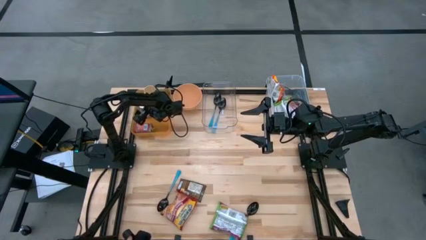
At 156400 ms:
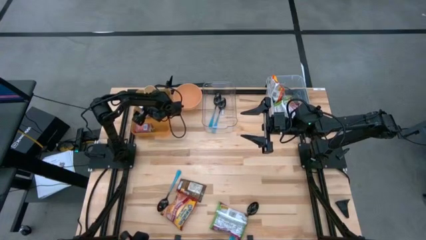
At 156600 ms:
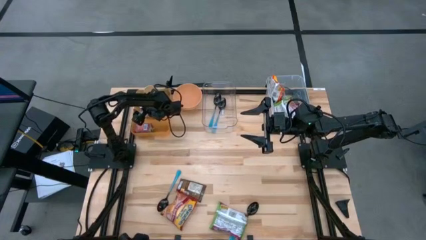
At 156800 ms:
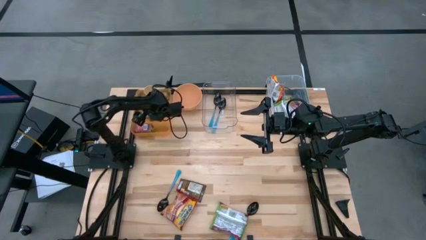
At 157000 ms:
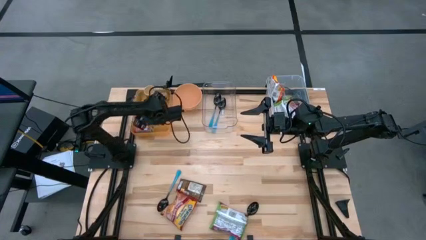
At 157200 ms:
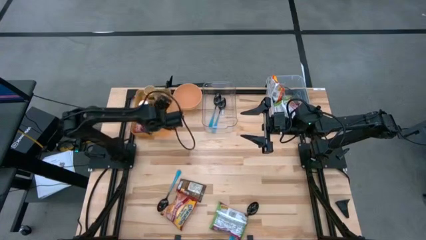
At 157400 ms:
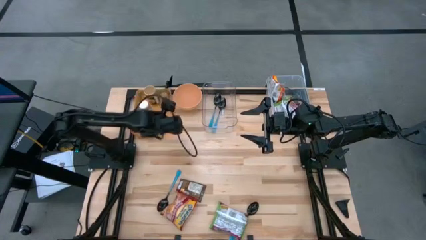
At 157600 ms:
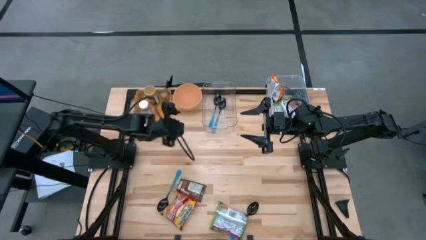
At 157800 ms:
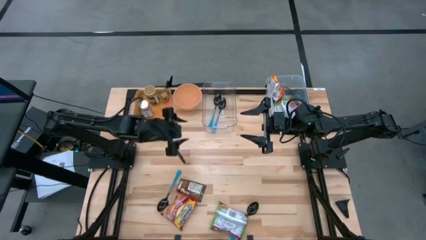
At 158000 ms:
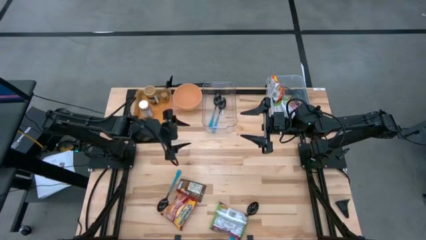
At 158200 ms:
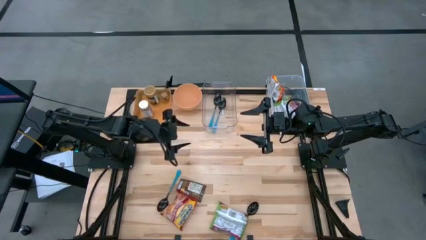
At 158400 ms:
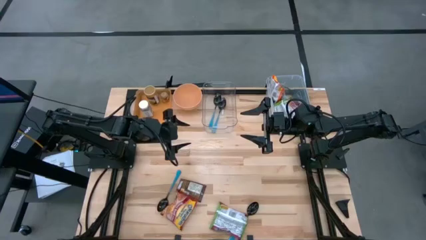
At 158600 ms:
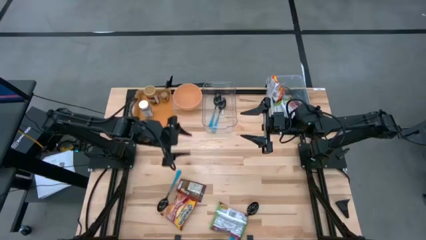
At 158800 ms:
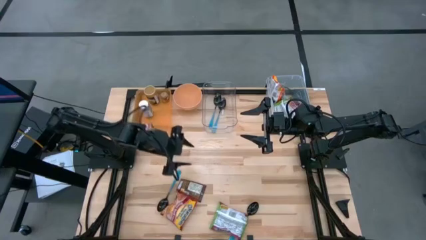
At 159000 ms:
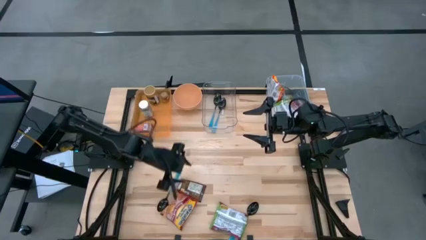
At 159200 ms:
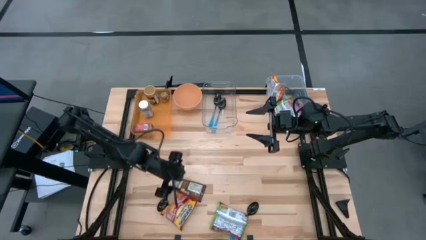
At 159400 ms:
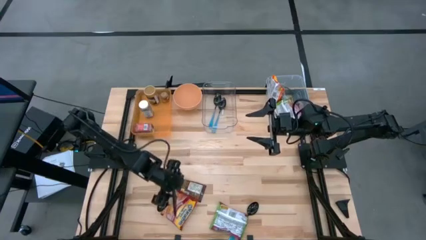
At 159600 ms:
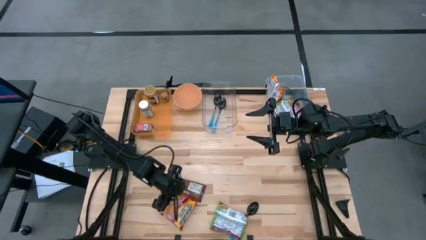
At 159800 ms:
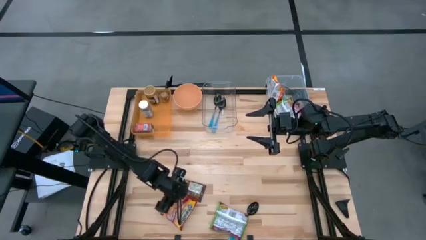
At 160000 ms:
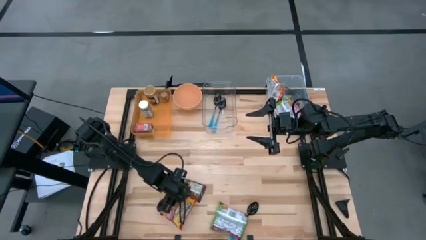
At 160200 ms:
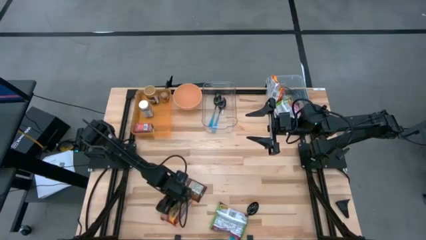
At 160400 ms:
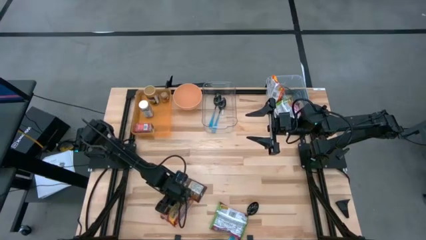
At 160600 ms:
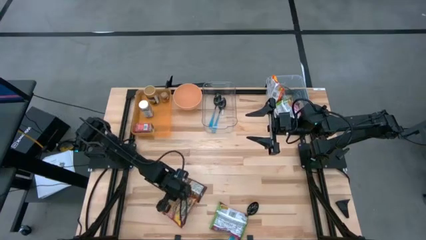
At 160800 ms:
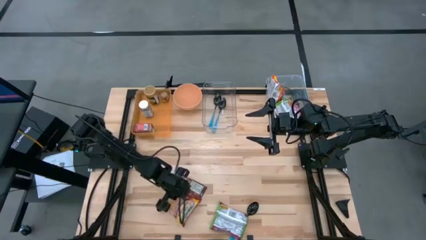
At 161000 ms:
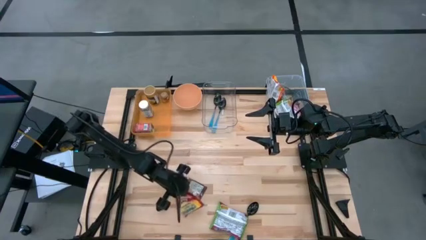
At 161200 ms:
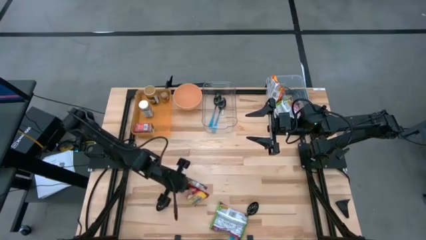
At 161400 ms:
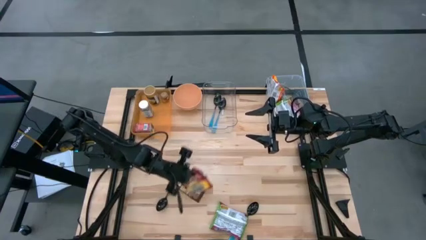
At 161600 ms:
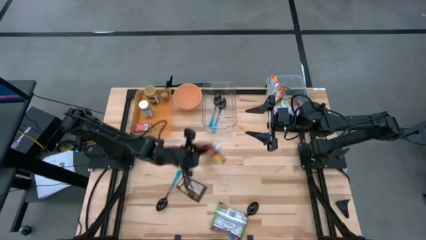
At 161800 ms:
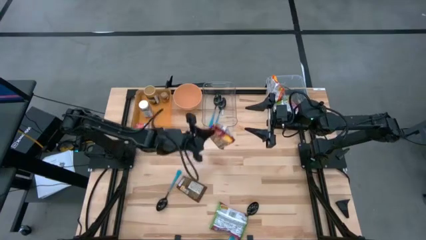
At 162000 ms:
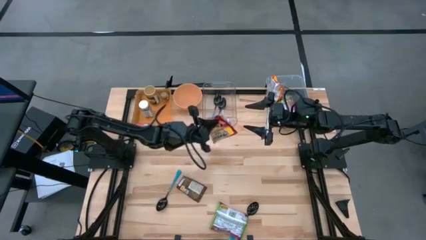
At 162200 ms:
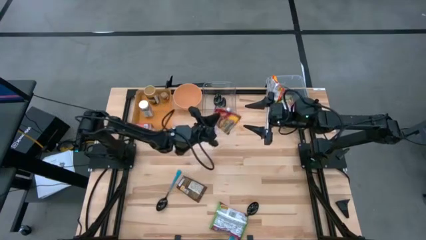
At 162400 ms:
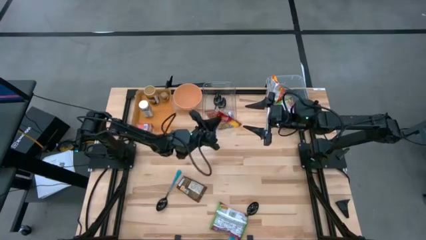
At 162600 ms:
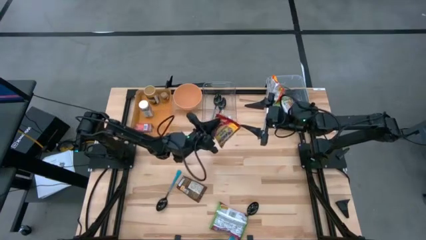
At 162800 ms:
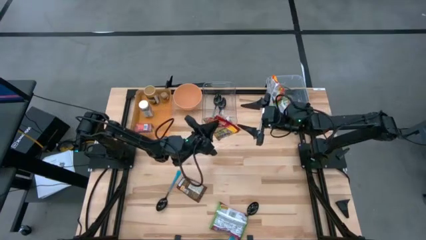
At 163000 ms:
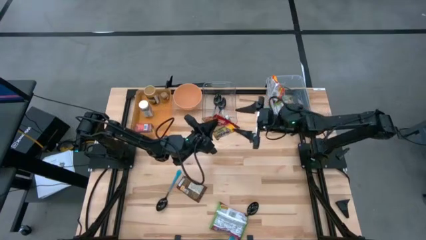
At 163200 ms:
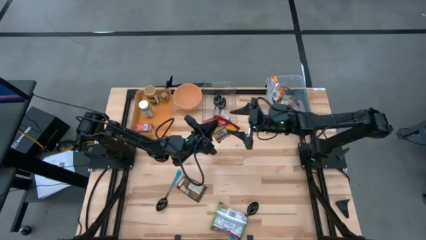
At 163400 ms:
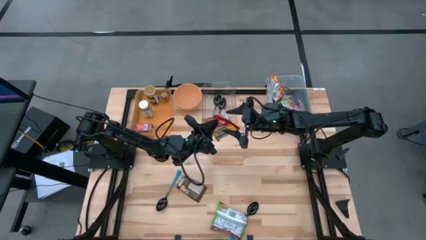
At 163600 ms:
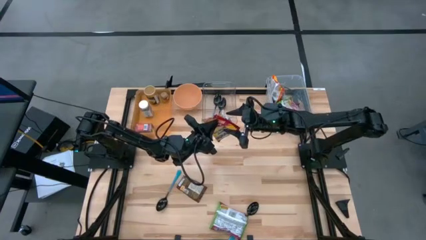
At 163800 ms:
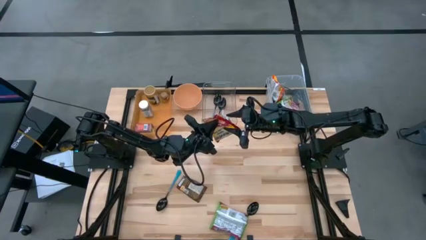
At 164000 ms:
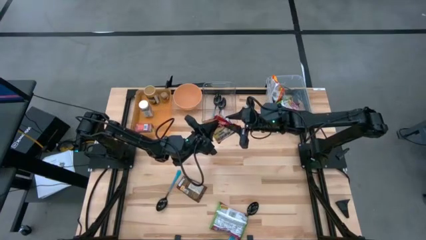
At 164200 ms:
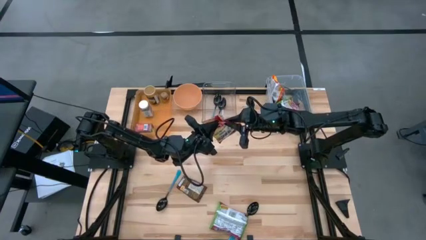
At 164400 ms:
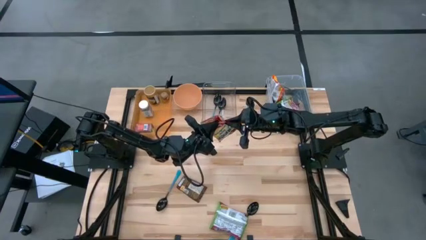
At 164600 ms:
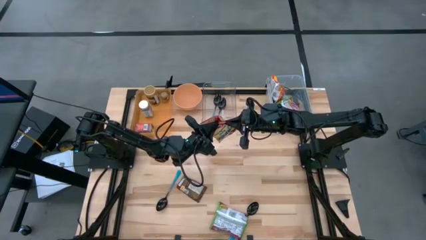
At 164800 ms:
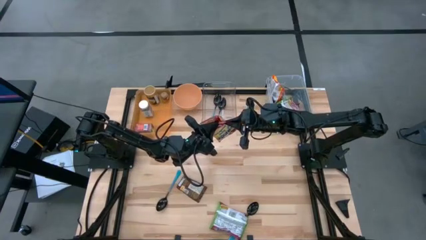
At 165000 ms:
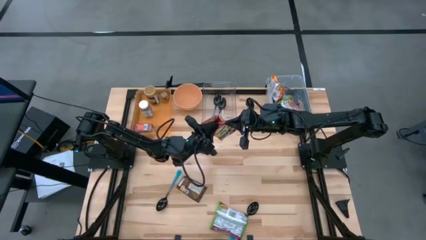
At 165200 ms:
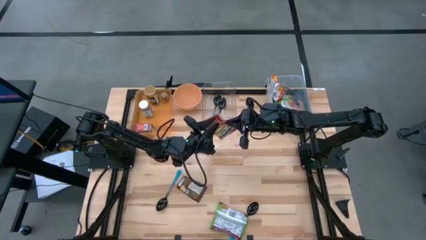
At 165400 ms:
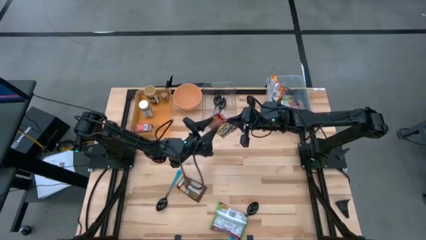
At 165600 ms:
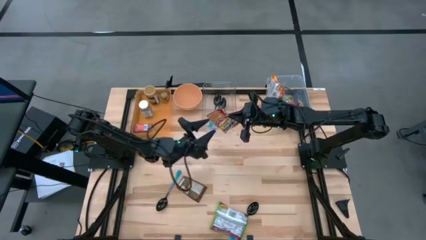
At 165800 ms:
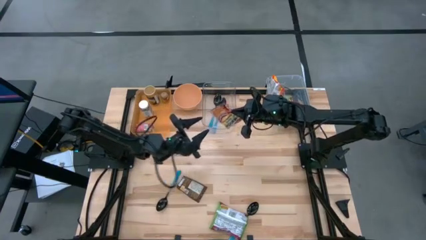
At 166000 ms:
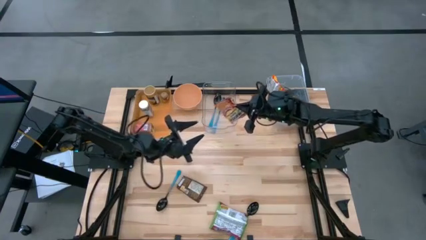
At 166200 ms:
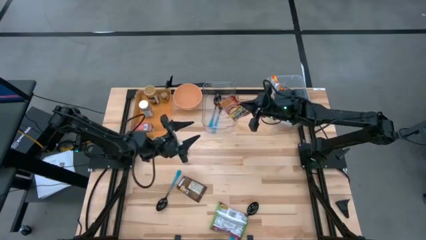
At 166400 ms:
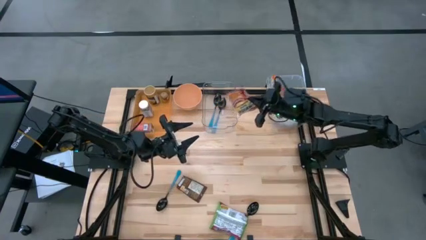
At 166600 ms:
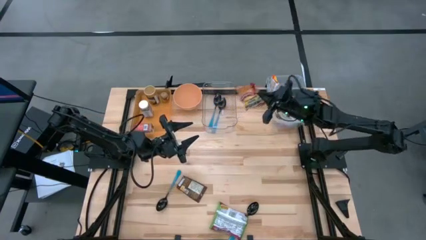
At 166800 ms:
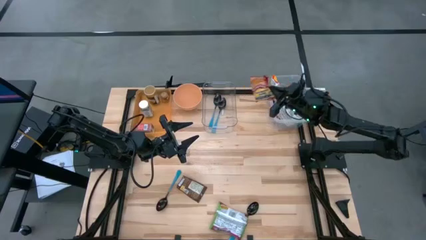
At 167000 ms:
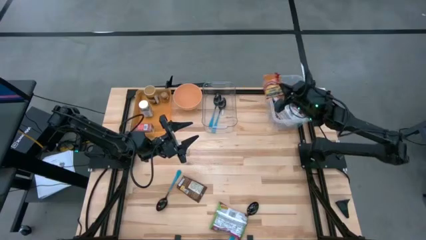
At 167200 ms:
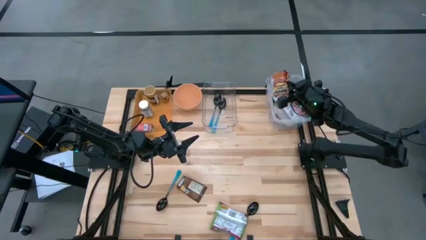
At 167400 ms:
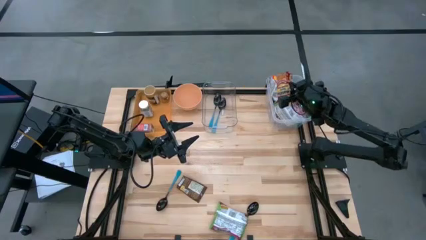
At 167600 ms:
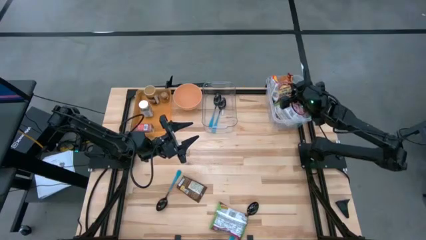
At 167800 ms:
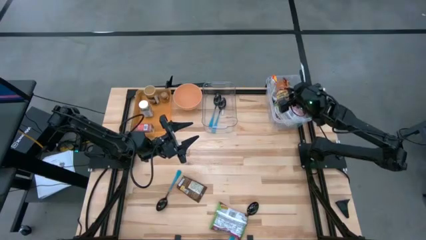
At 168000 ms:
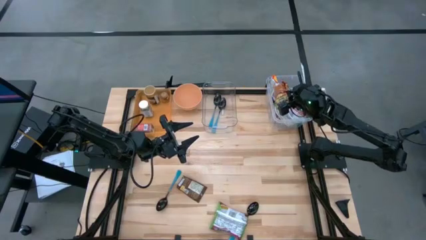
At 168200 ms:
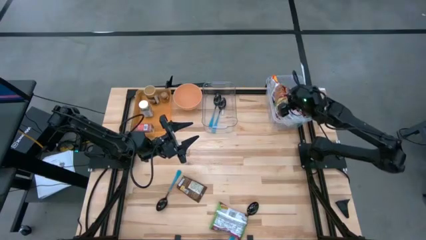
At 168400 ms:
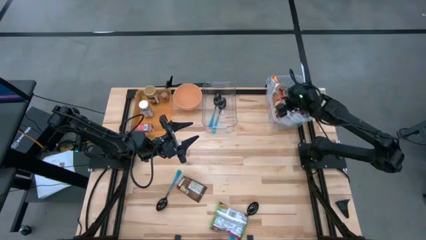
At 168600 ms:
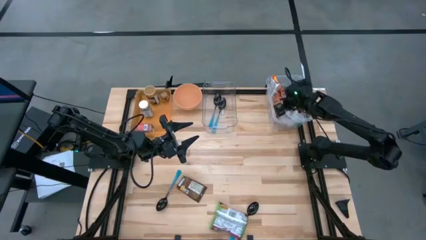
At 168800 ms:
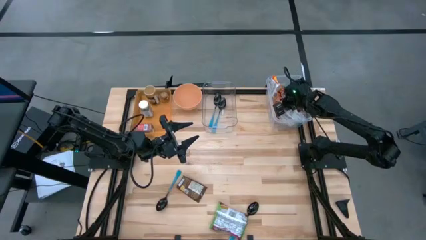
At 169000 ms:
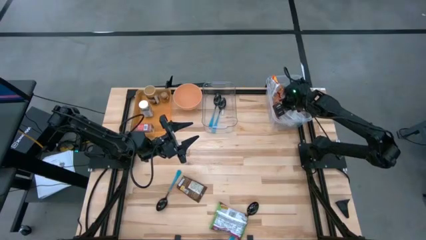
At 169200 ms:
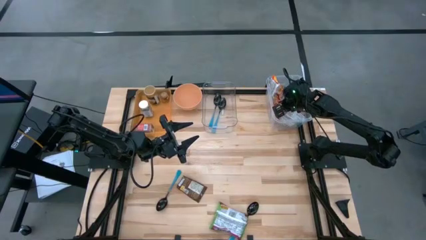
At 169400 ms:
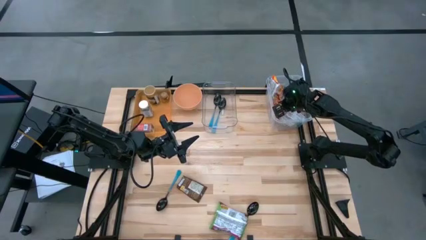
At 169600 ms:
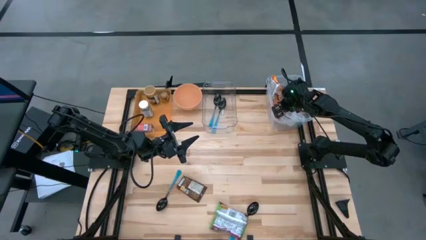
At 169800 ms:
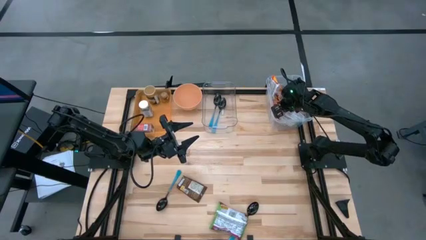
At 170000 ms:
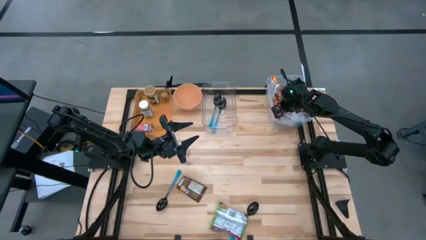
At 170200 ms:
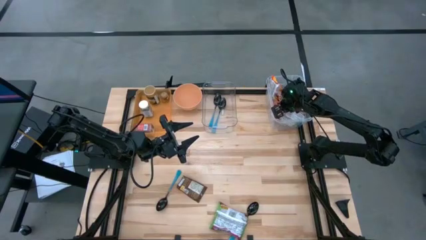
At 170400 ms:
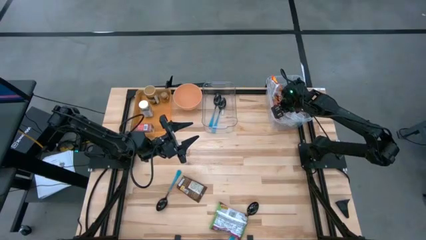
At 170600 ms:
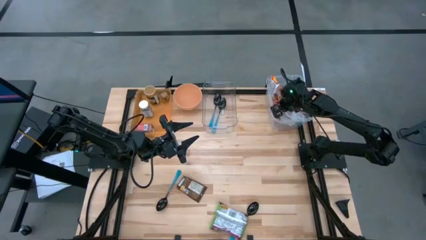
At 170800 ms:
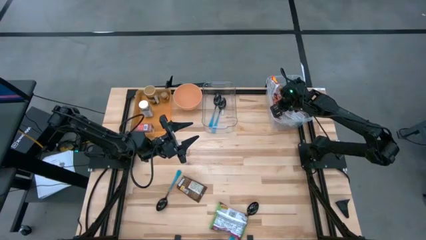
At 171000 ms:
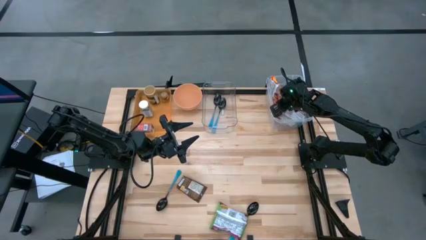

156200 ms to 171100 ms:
Task: Pick & Place Food Item
Put the red noodle pack into the transparent bin
